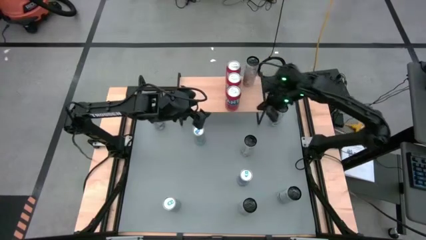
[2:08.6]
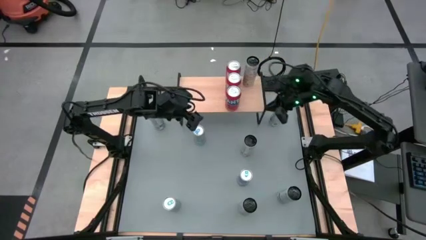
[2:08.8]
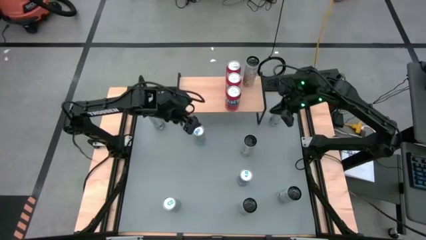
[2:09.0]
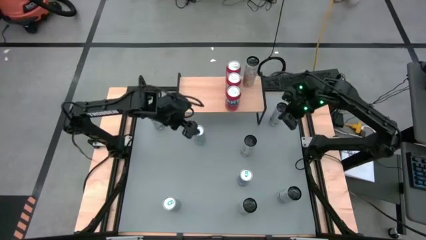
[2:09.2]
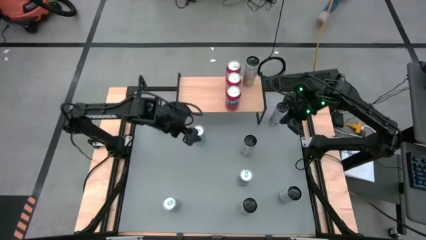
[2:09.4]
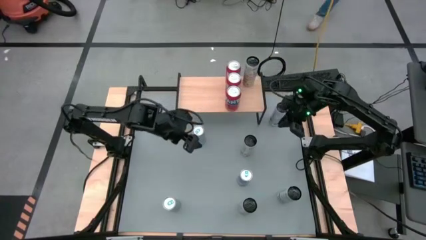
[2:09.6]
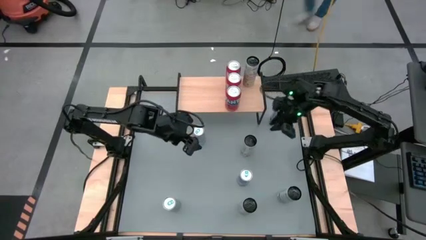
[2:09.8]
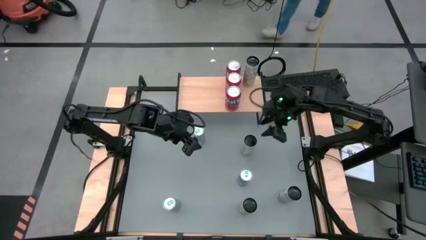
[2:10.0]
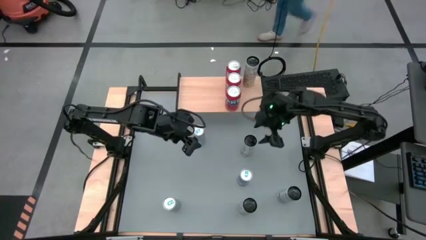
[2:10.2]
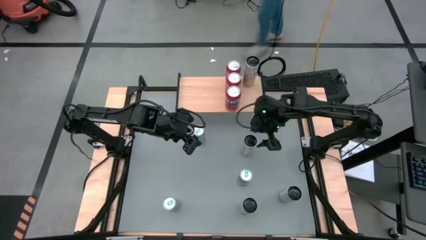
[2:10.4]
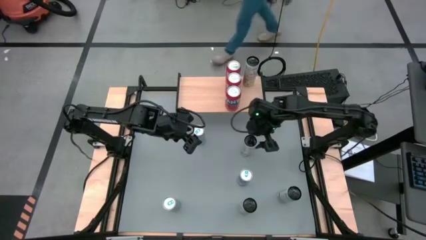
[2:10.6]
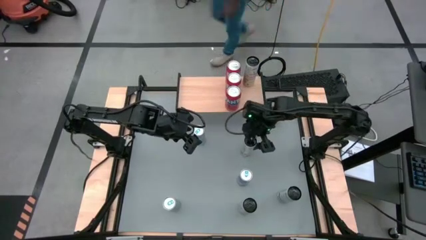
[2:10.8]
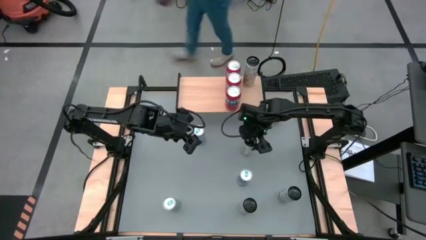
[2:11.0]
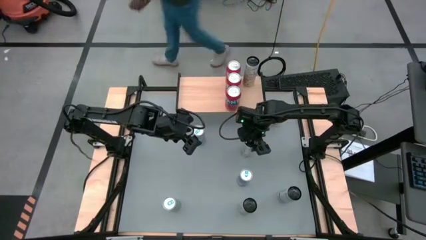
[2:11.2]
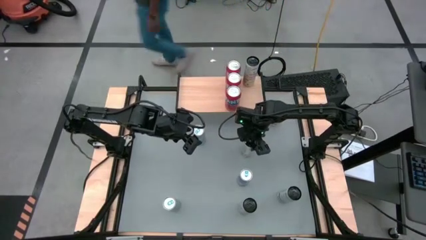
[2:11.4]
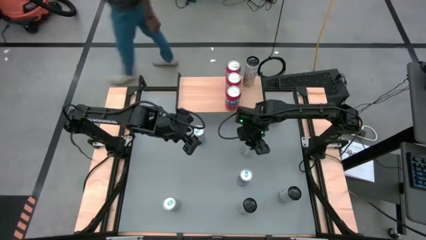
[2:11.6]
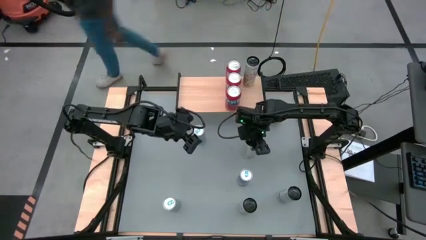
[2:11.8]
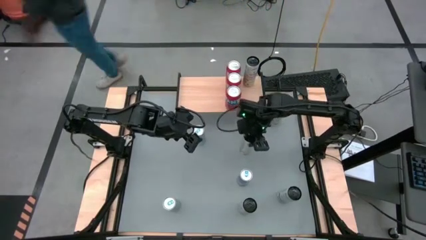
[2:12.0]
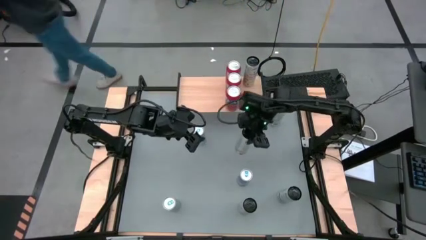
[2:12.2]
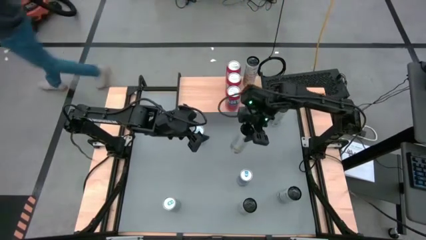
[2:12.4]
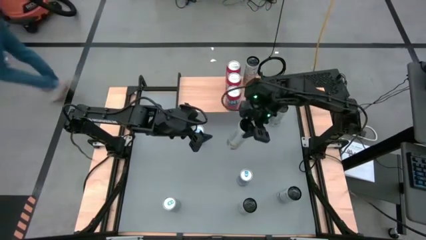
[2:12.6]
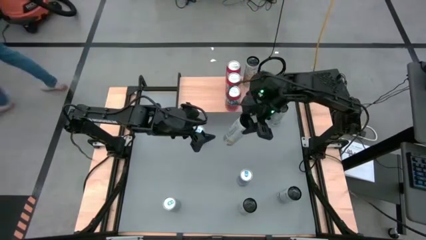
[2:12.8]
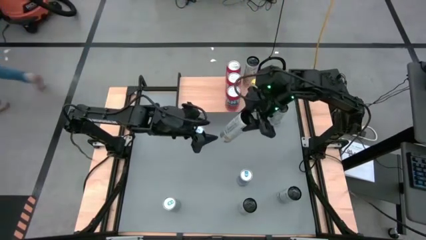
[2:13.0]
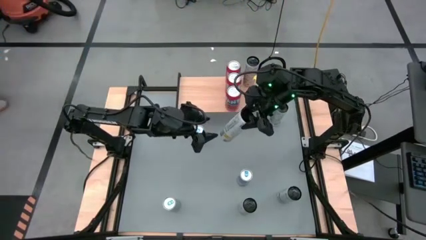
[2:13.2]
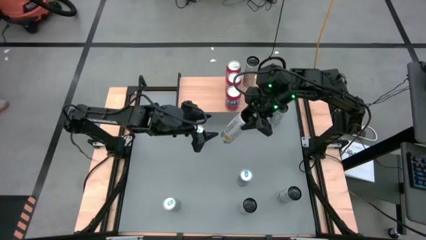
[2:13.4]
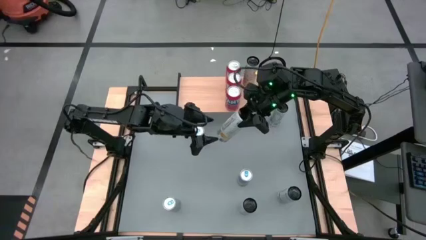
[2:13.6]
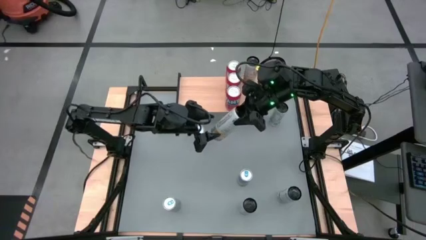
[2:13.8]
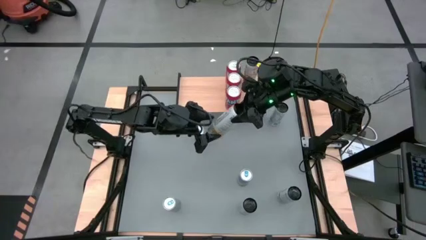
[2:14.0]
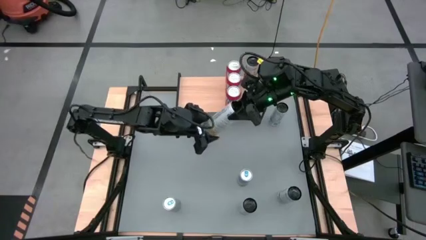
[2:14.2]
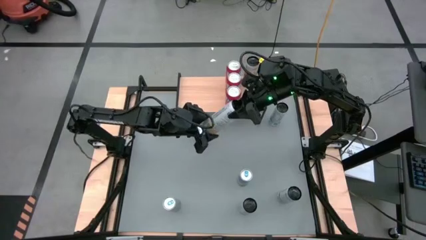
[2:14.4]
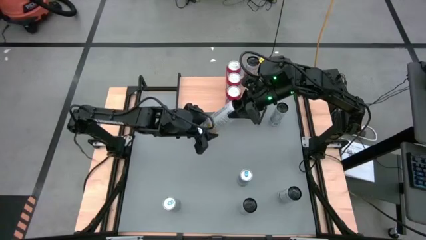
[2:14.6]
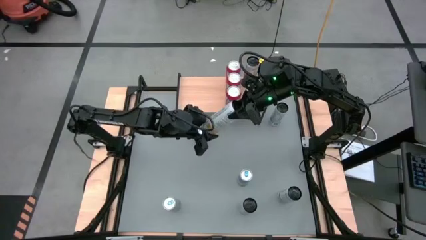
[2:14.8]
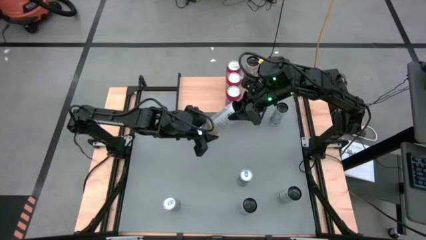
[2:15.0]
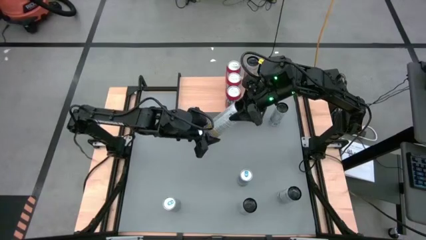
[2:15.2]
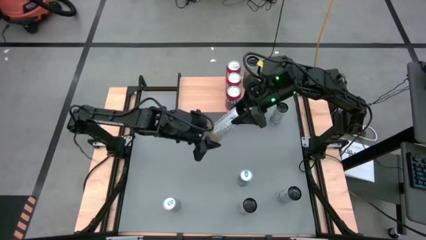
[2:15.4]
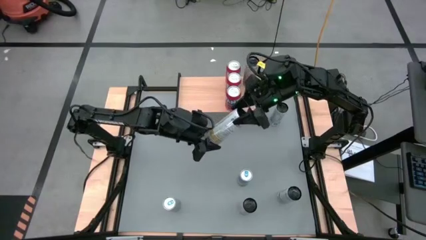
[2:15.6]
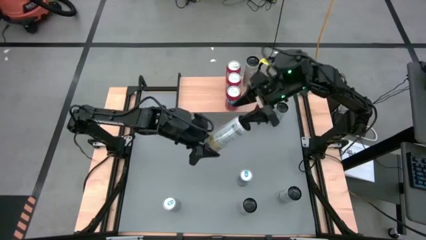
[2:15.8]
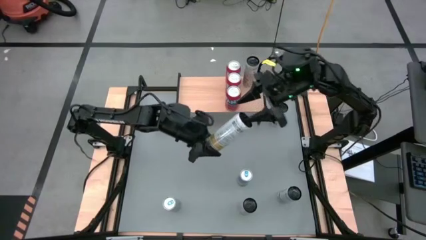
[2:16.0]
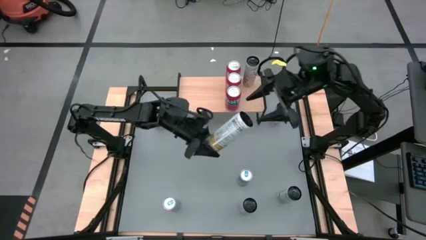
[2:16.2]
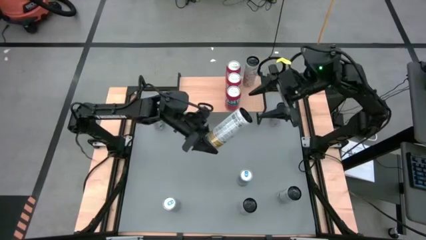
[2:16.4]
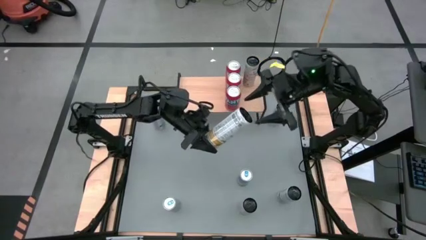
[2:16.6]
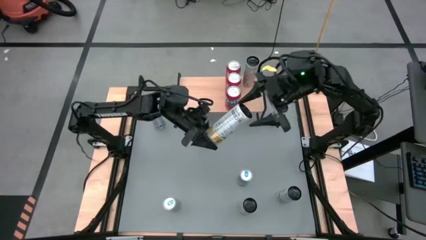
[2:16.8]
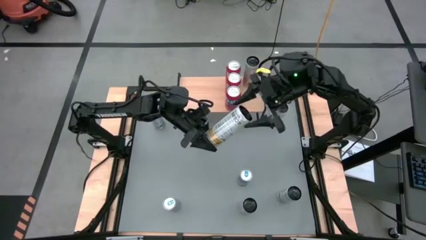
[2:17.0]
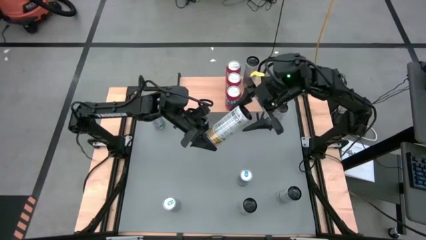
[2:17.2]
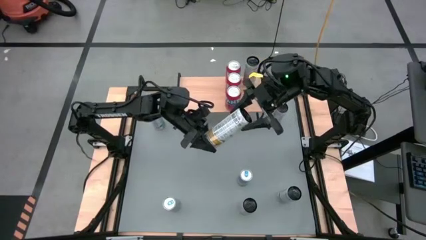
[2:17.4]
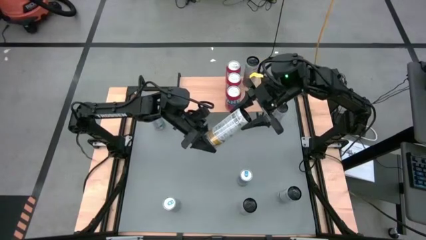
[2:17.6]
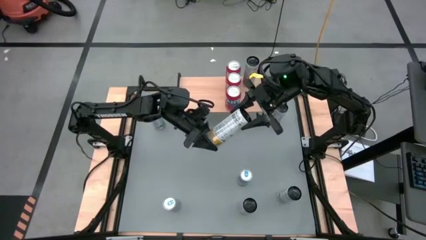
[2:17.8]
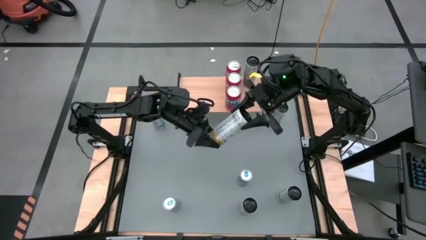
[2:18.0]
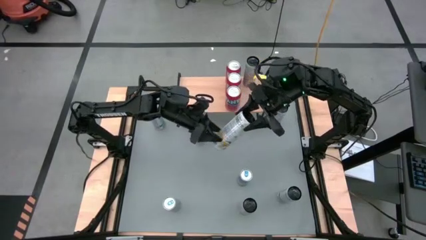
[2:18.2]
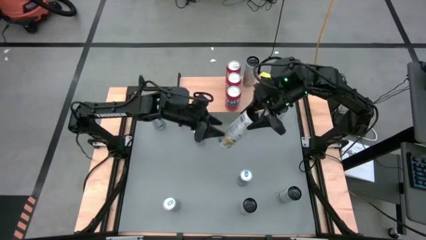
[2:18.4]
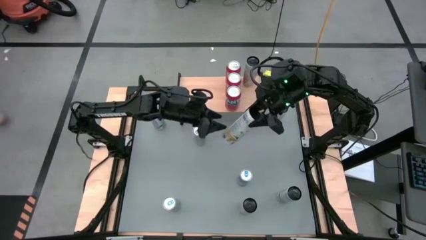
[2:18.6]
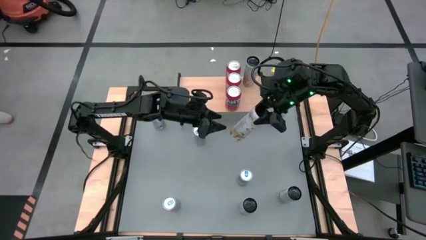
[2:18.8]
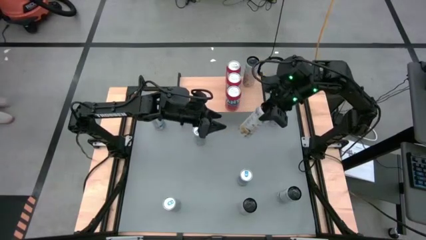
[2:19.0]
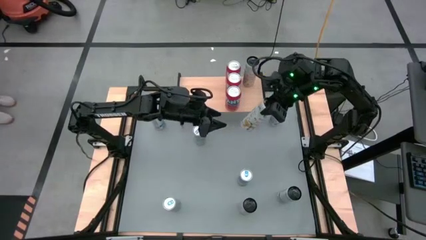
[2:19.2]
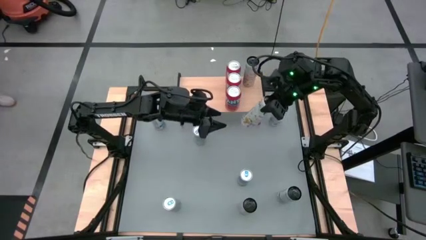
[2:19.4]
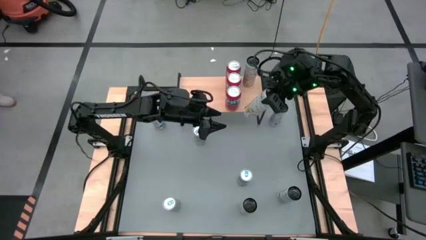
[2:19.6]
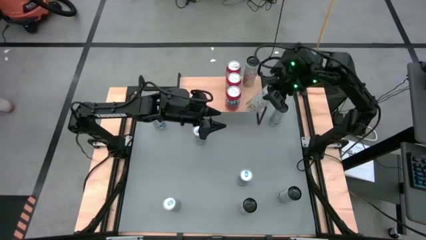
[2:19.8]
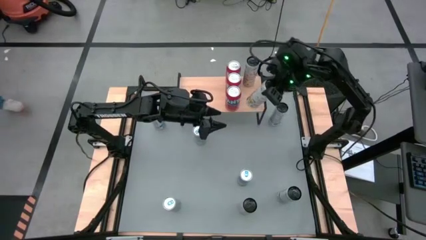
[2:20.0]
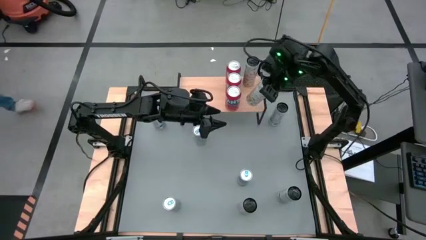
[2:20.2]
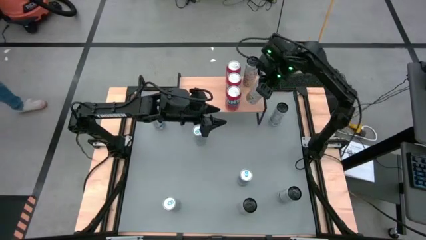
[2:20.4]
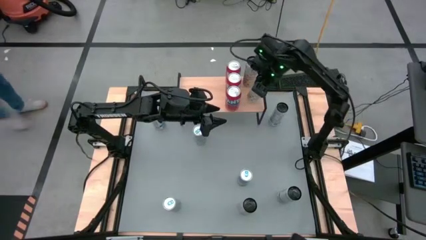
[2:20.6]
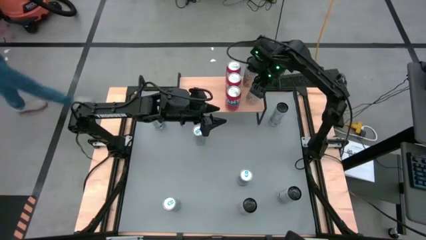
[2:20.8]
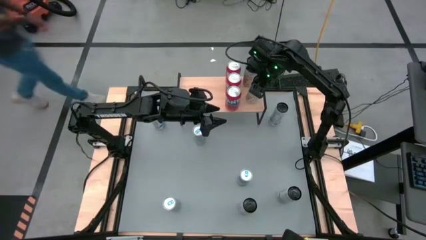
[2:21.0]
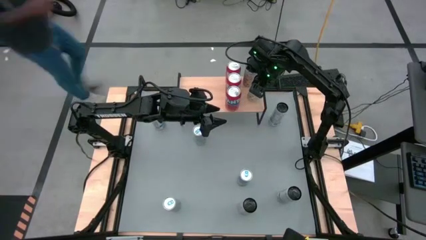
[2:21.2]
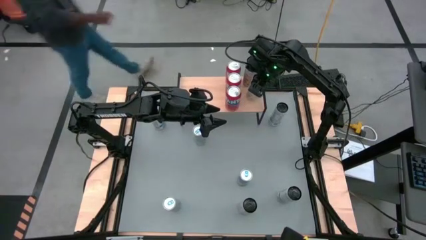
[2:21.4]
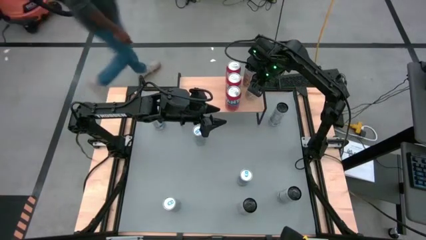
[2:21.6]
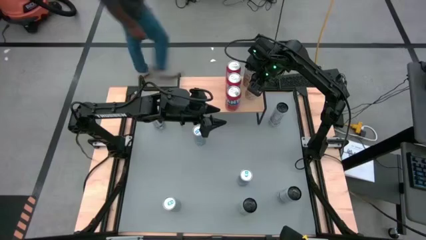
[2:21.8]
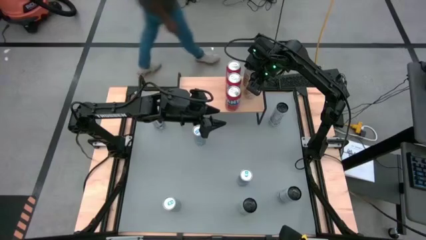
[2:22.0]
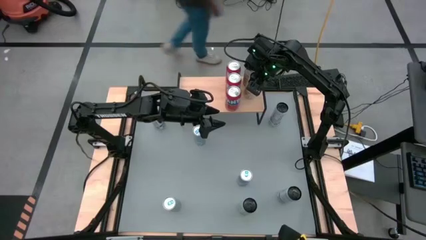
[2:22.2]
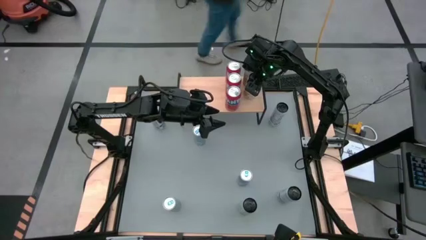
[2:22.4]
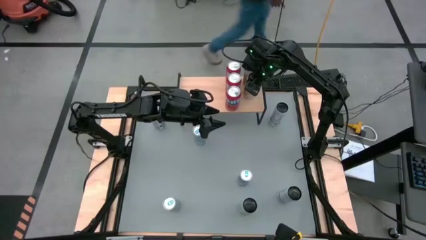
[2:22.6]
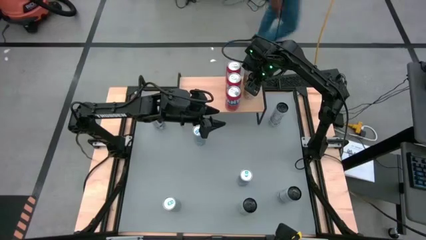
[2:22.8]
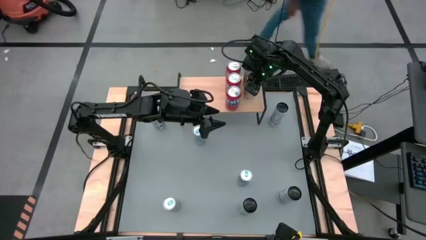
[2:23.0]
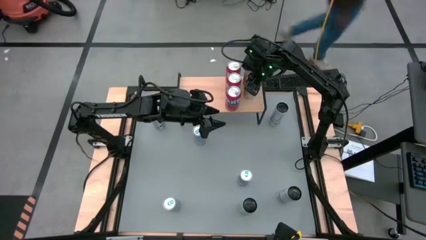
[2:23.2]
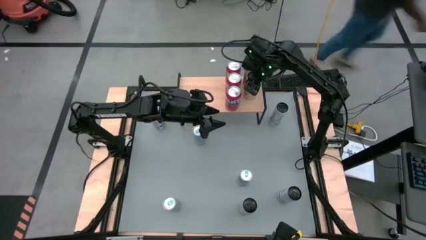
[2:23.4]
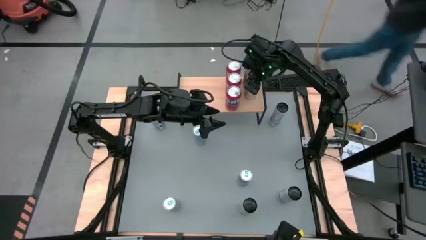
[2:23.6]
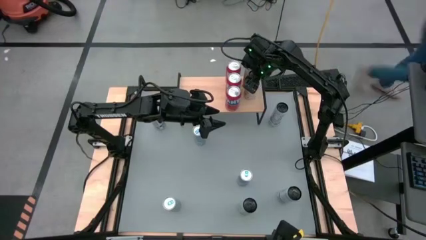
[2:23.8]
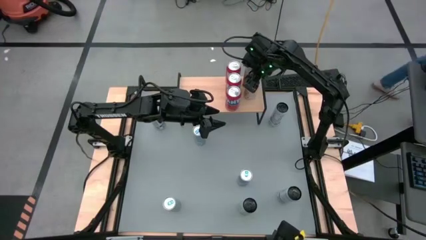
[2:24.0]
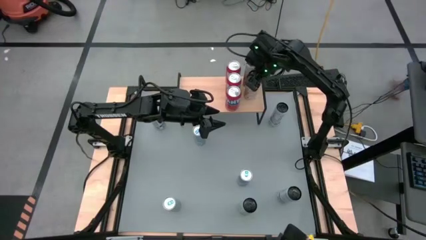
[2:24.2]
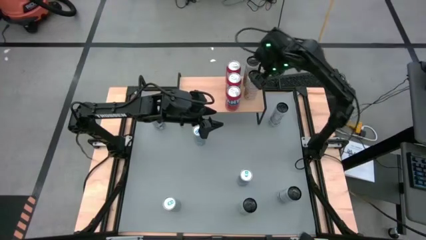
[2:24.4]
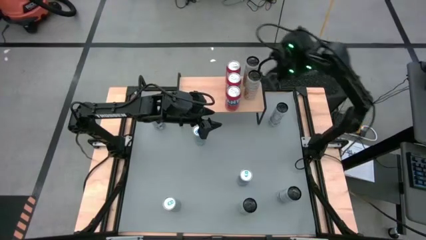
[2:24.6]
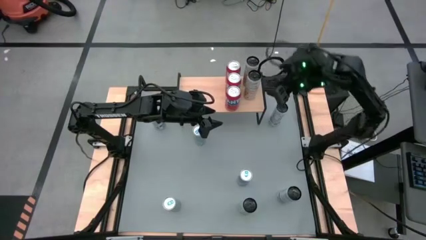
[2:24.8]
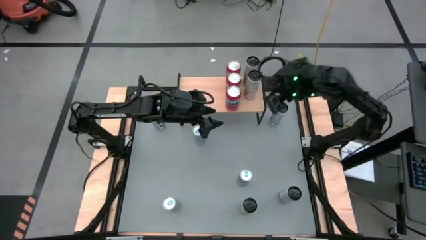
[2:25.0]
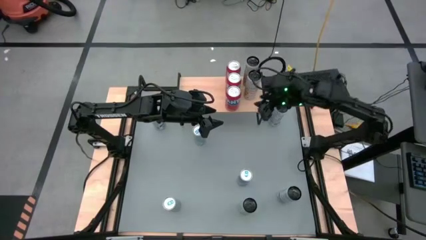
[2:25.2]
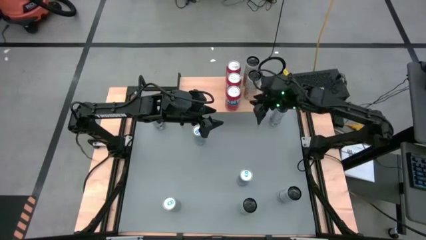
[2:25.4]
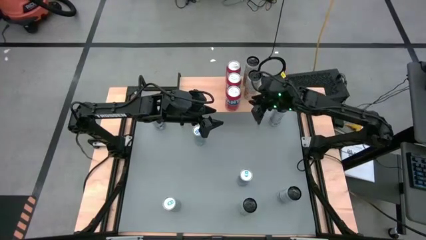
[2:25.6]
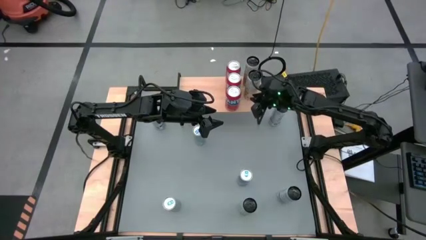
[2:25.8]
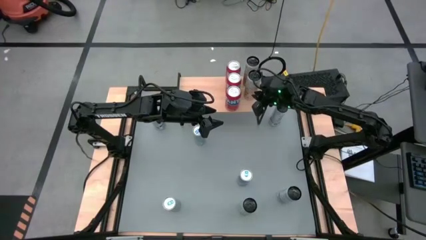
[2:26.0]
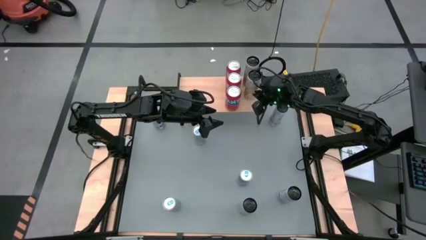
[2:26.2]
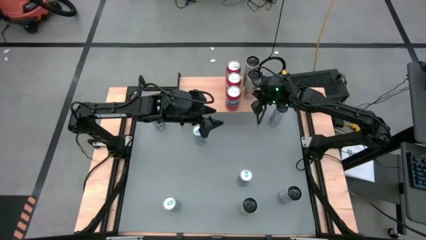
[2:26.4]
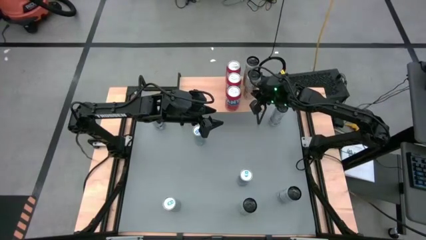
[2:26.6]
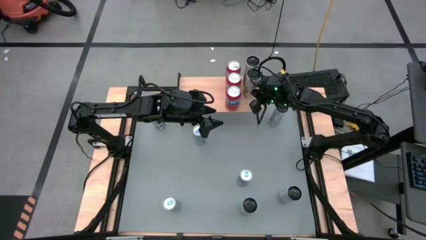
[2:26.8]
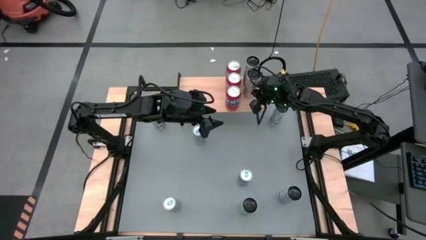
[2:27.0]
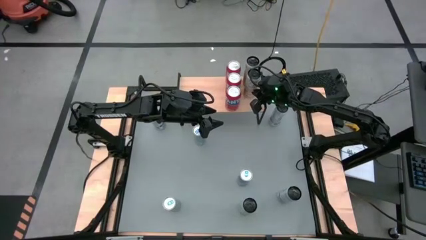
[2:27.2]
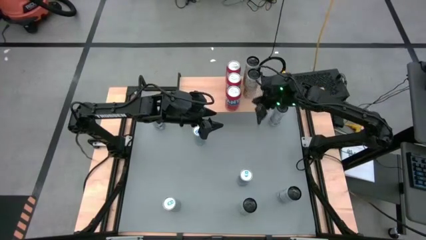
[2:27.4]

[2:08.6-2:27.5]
Task: Place canned beverage on shelf
Put the top yellow soda can on the shelf aligned with the other yellow soda can
